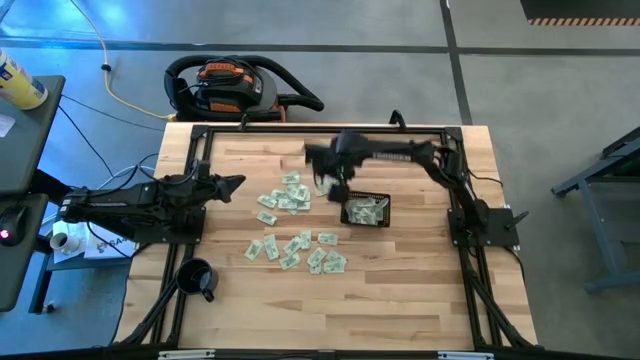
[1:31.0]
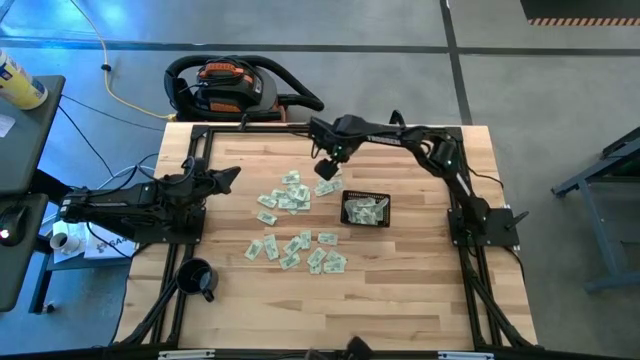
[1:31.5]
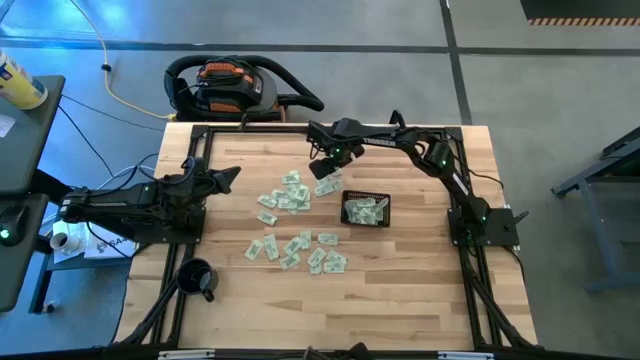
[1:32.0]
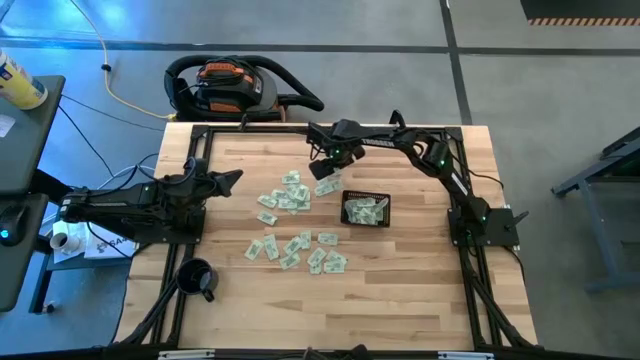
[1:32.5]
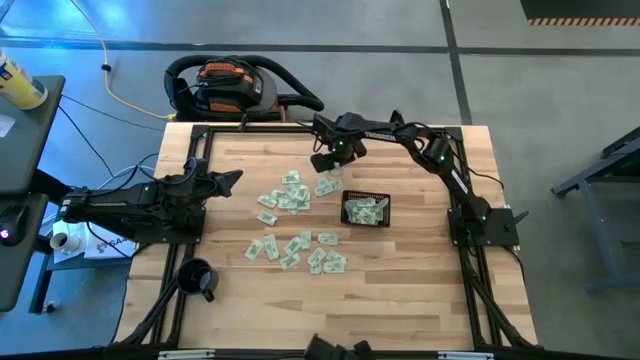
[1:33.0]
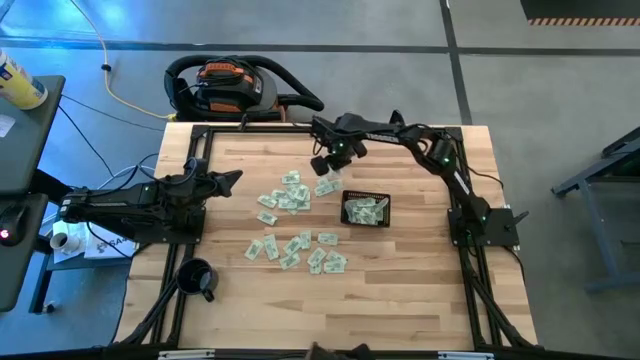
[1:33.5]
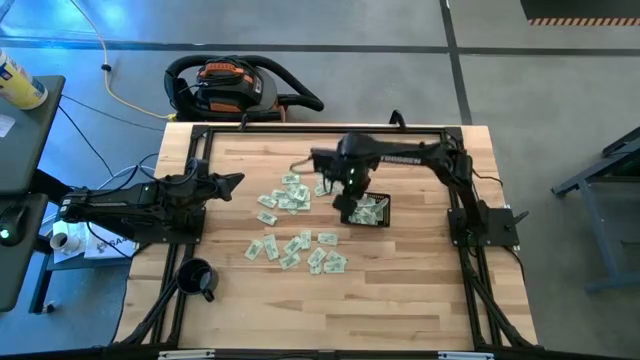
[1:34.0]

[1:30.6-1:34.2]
Task: Pick and place Stevia / Truvia into bins
Put the green stevia packet into the black bin

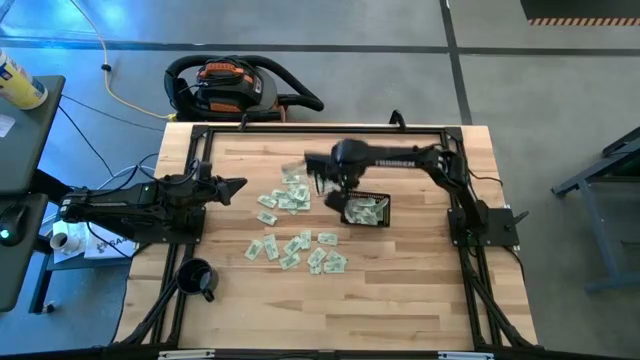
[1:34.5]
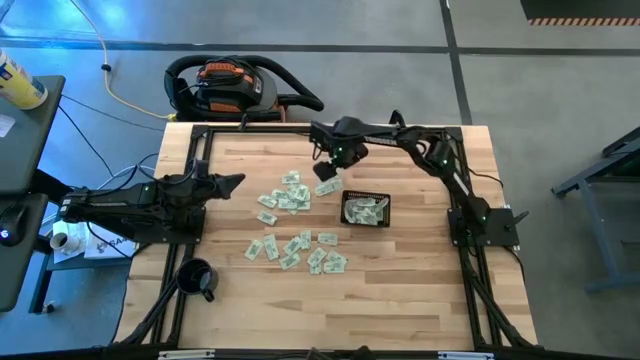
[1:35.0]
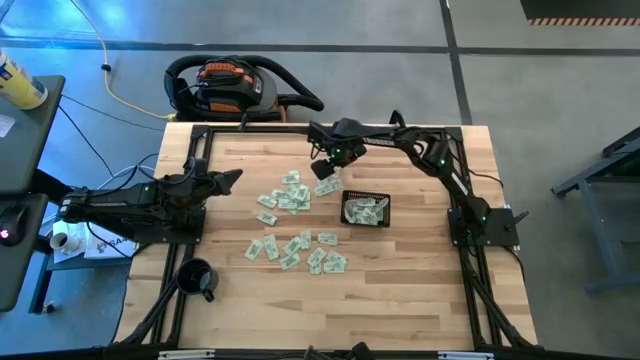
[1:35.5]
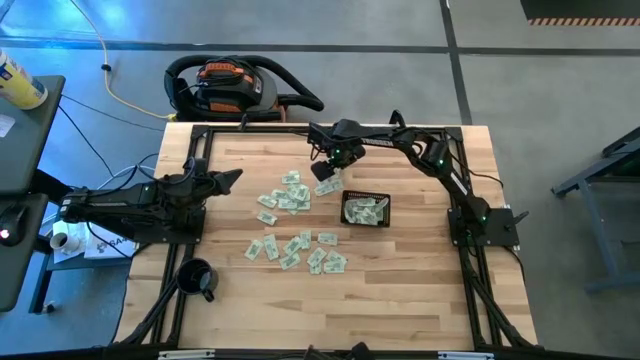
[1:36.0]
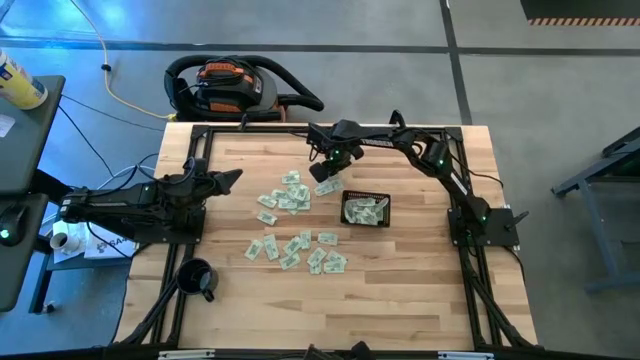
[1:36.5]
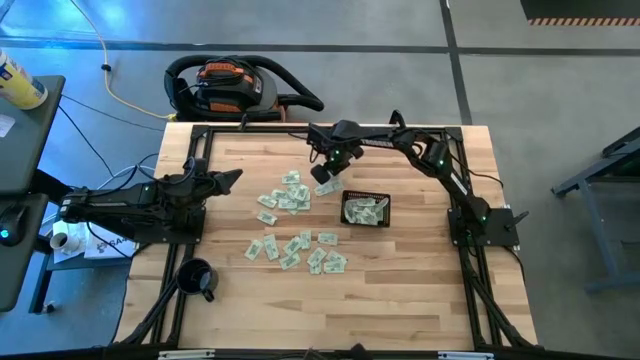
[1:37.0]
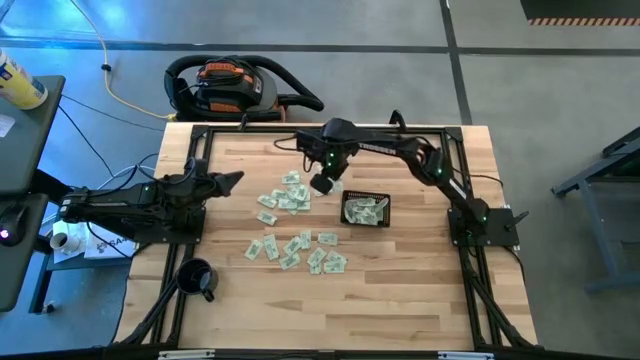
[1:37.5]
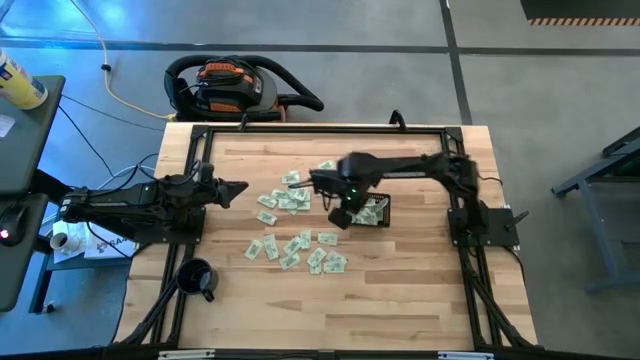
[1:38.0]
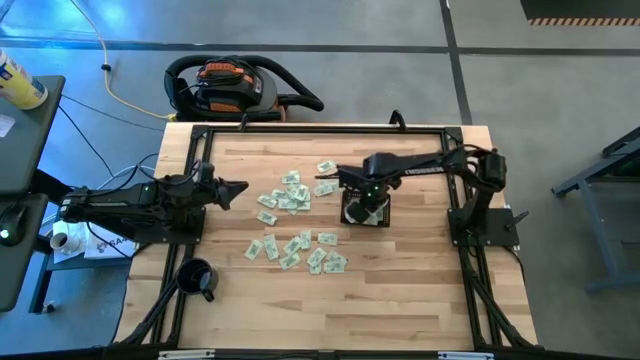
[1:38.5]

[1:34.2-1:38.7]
Put the green stevia packet into the black bin

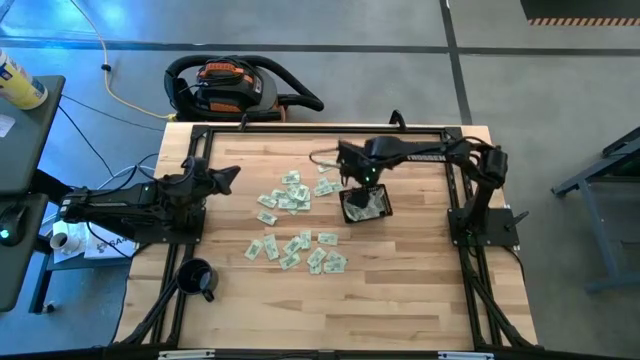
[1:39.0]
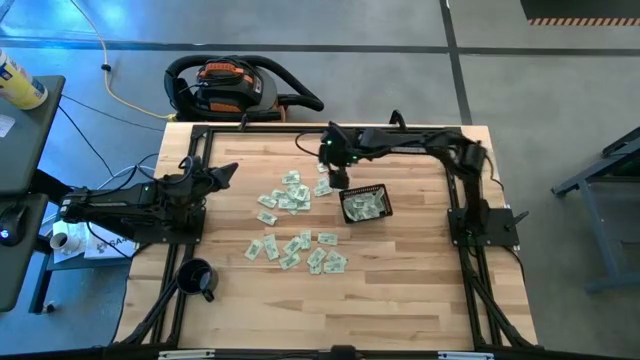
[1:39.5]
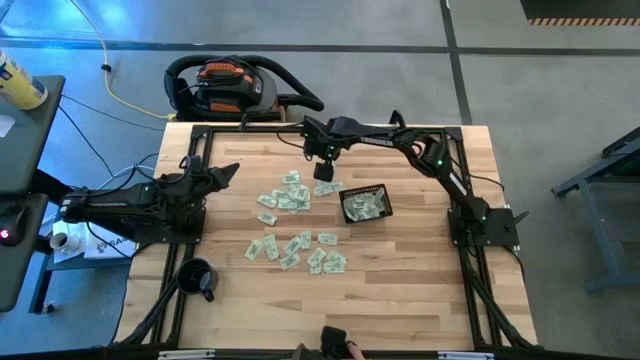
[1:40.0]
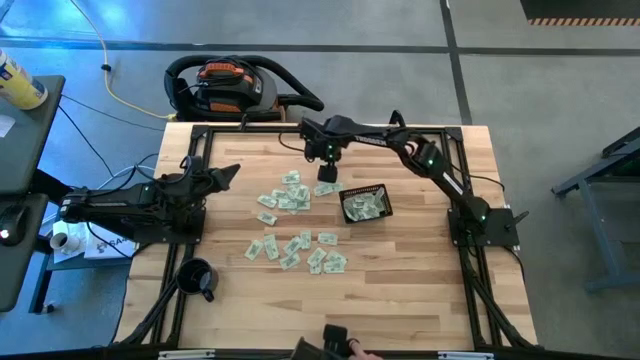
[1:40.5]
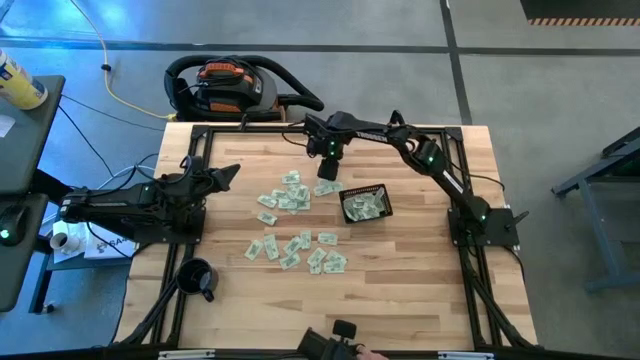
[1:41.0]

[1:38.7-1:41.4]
Put the green stevia packet into the black bin

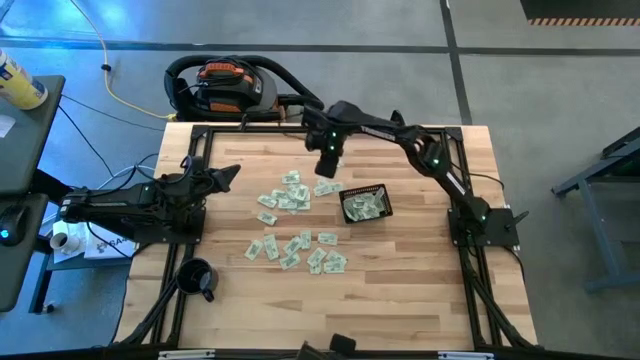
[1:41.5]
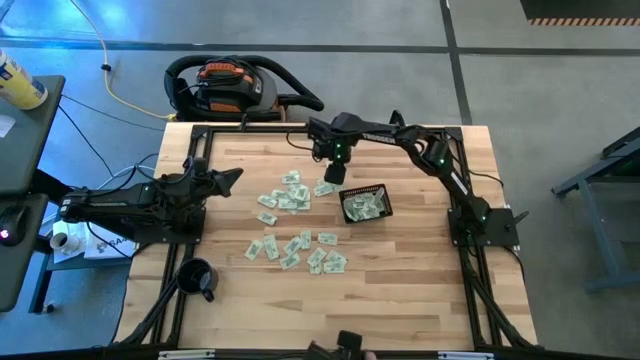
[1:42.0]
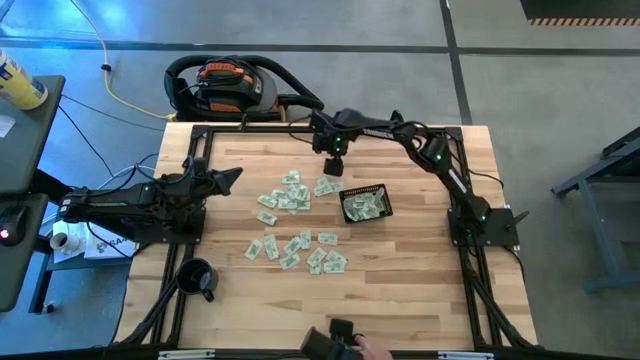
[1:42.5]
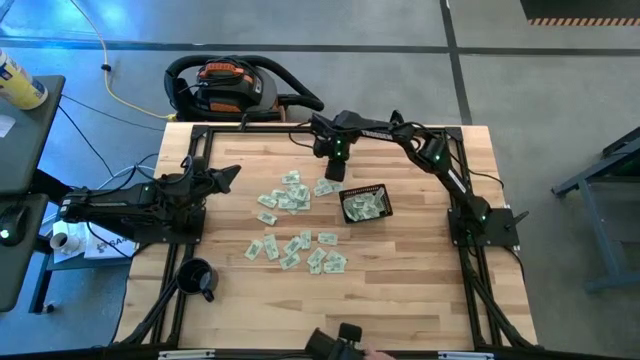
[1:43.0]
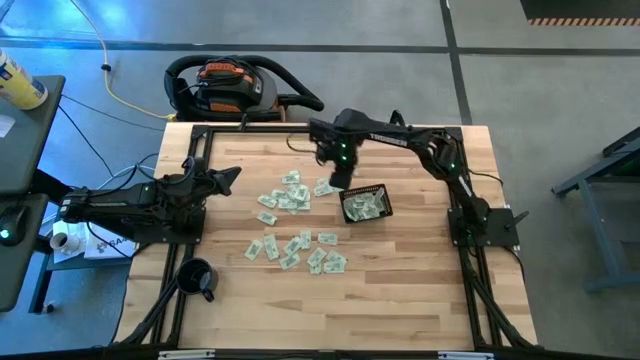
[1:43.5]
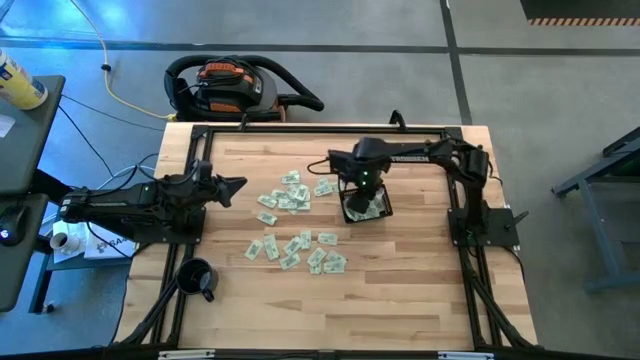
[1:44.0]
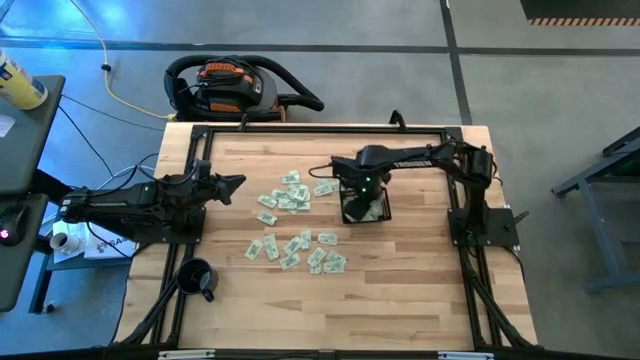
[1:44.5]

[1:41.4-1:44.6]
Put the green stevia packet into the black bin

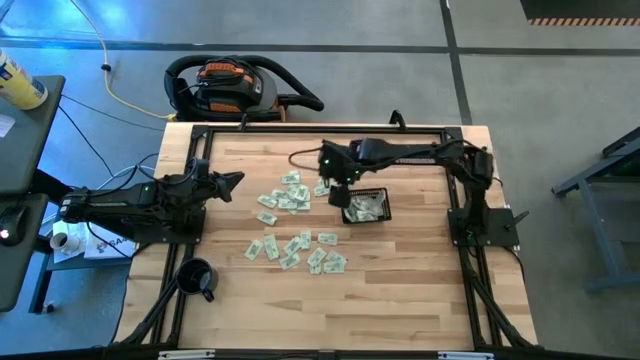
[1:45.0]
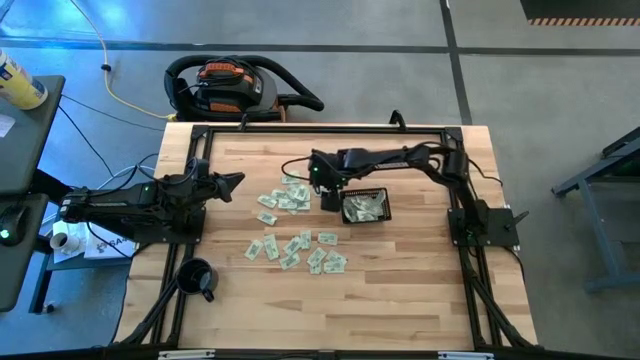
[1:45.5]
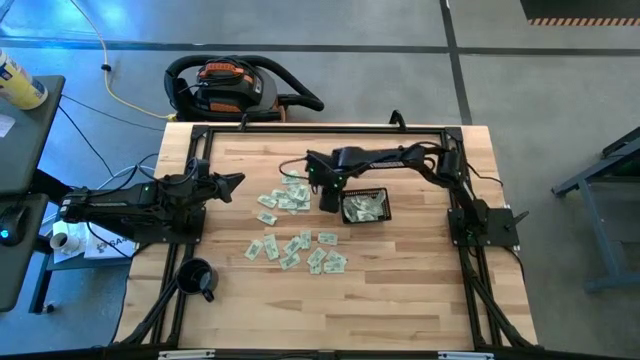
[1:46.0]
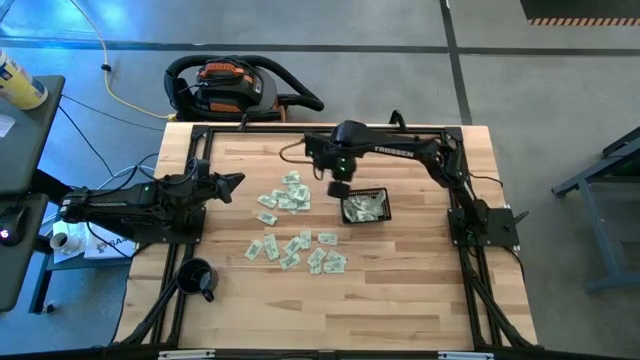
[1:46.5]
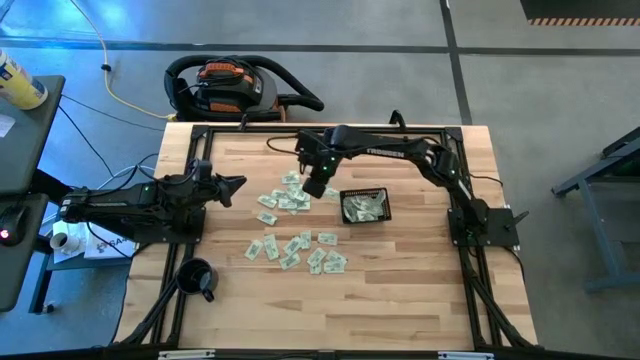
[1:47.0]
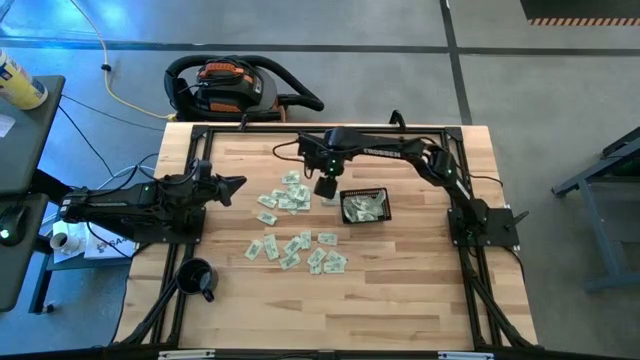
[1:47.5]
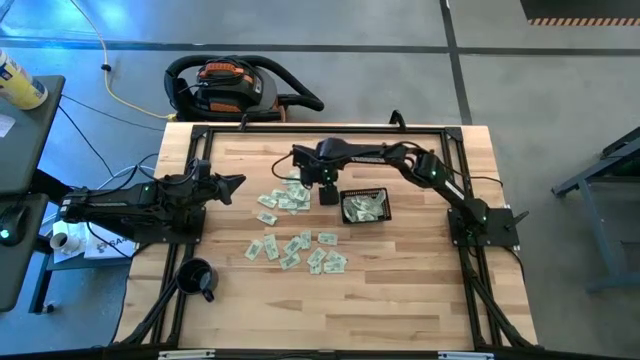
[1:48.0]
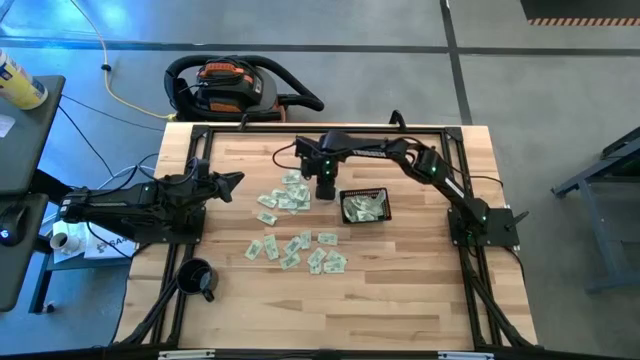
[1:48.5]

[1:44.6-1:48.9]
Put the green stevia packet into the black bin

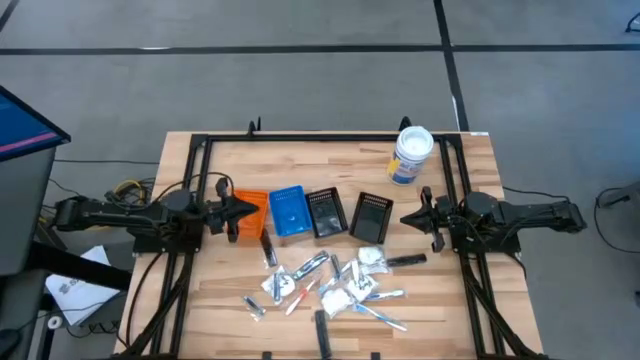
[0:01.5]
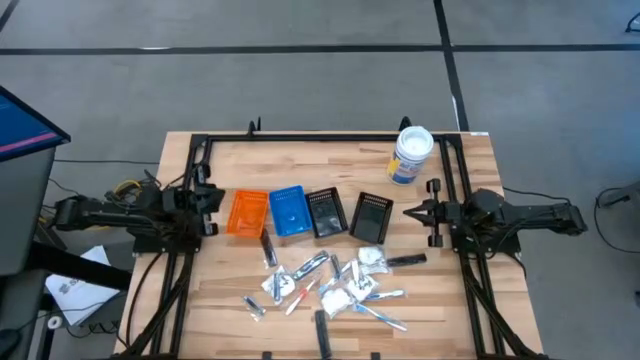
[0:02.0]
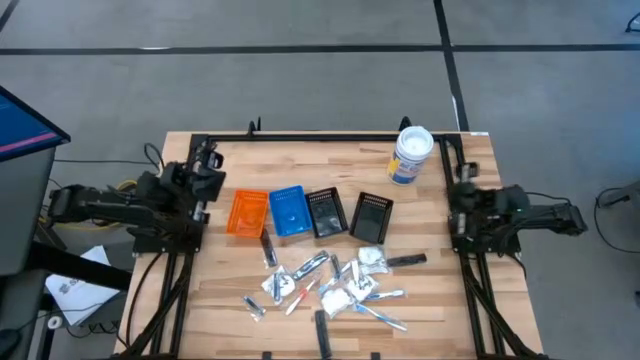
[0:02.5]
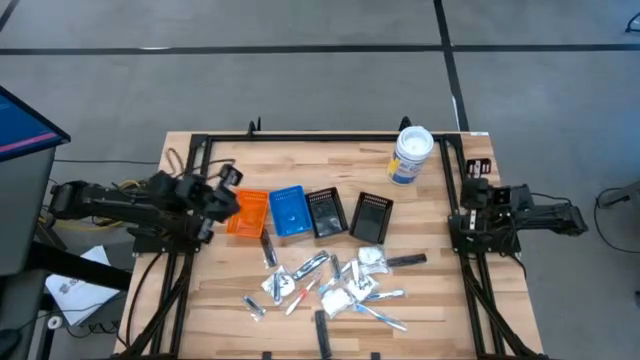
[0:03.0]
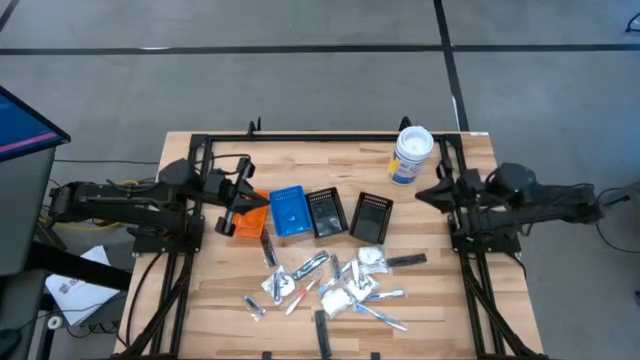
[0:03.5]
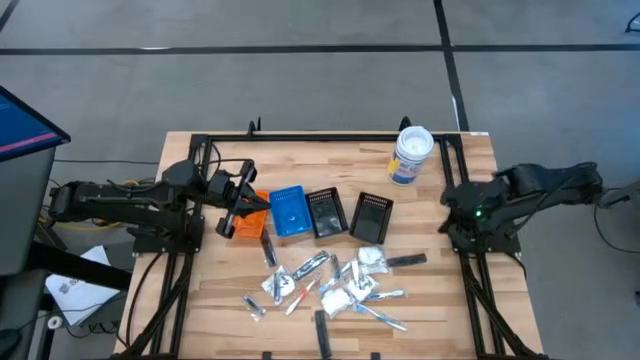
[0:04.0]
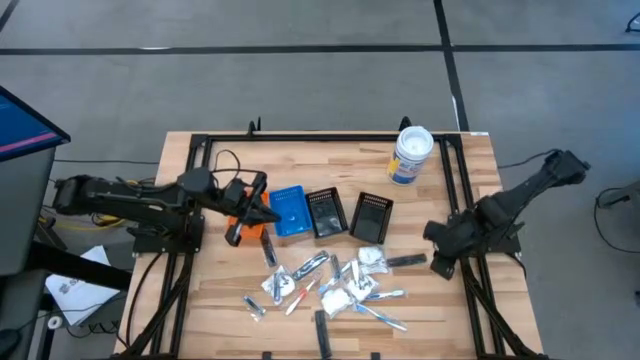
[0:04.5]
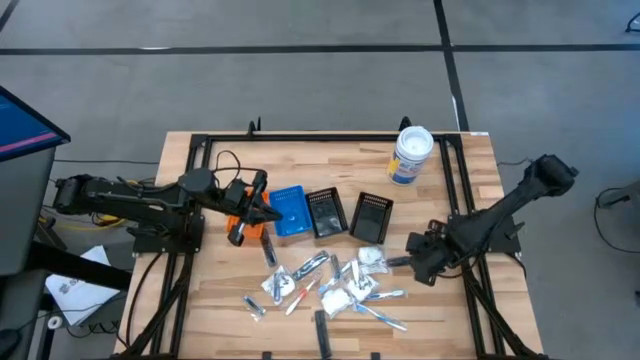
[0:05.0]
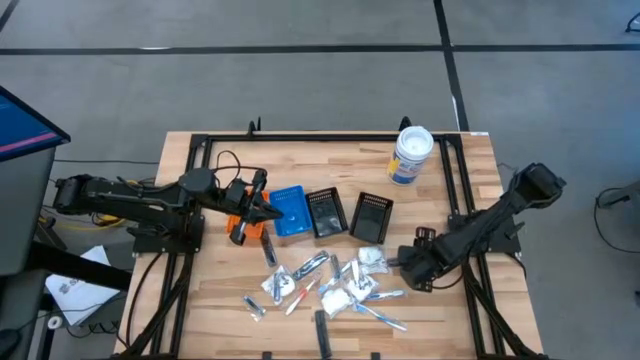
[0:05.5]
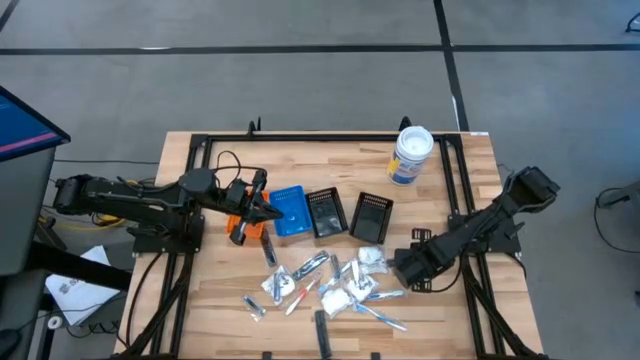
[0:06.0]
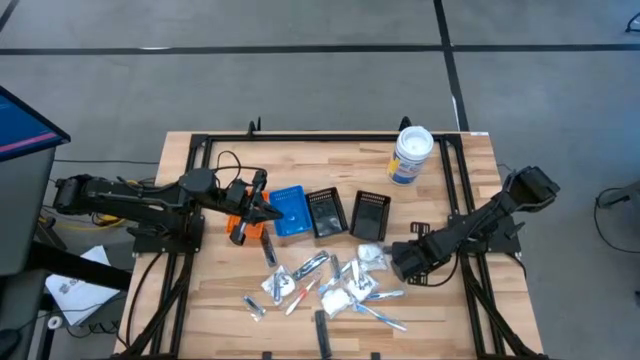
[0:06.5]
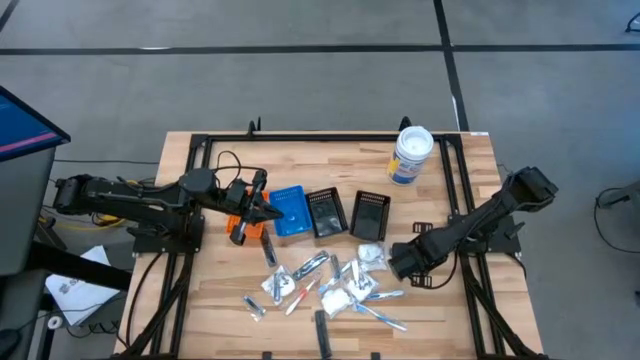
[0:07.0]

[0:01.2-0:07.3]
Task: Pick & Place Travel size toiletries
Put the black comb into the right black bin
